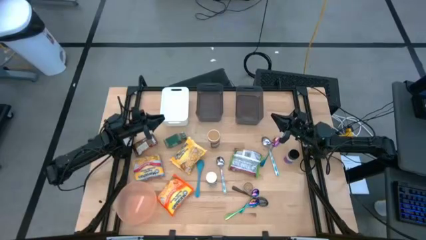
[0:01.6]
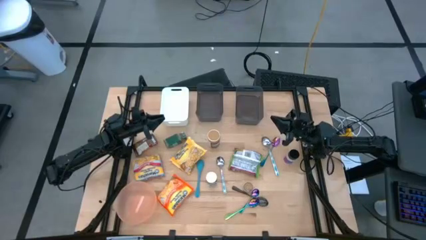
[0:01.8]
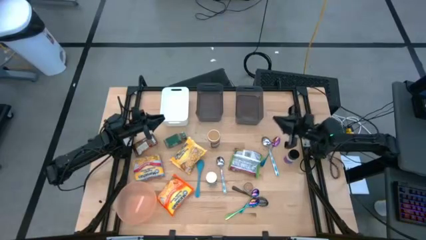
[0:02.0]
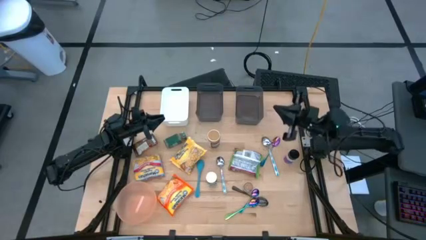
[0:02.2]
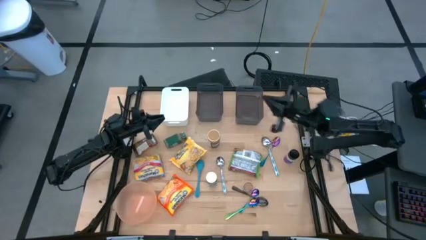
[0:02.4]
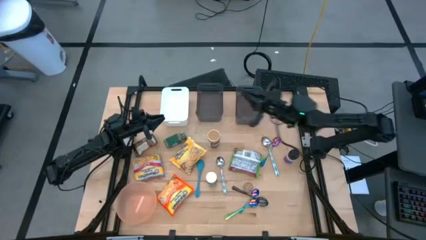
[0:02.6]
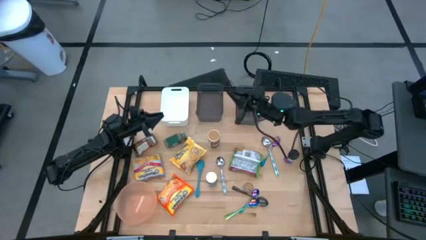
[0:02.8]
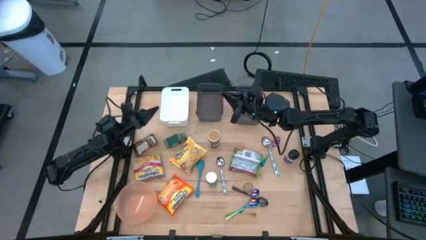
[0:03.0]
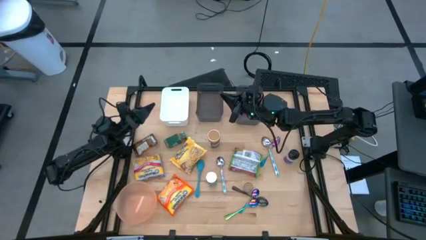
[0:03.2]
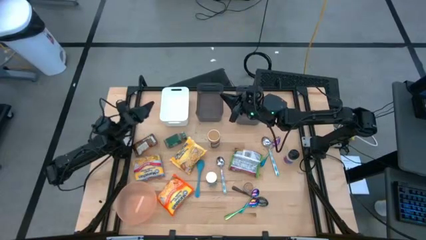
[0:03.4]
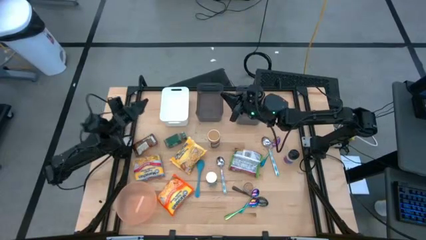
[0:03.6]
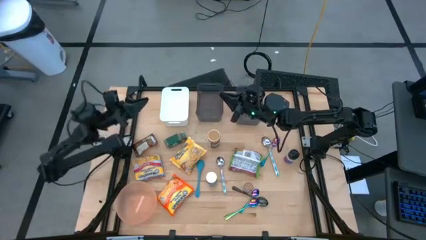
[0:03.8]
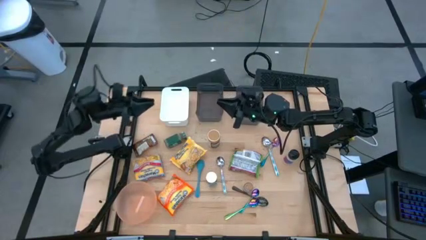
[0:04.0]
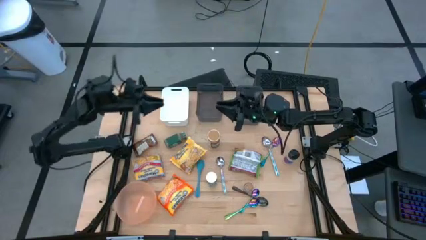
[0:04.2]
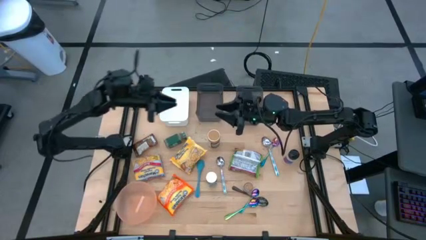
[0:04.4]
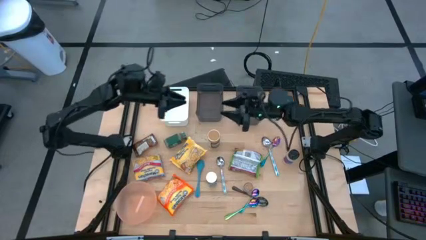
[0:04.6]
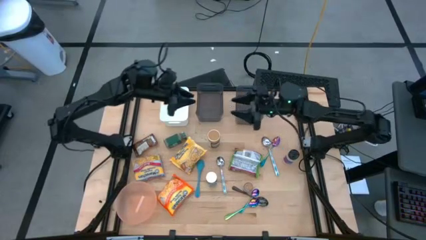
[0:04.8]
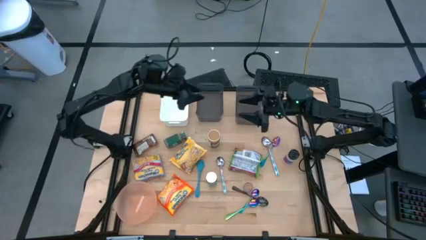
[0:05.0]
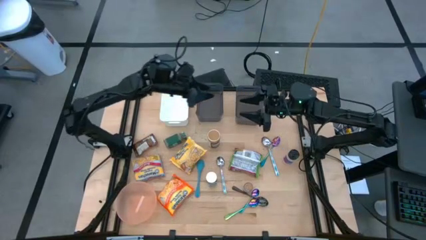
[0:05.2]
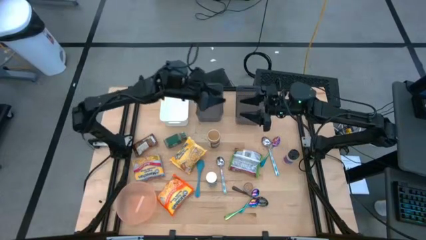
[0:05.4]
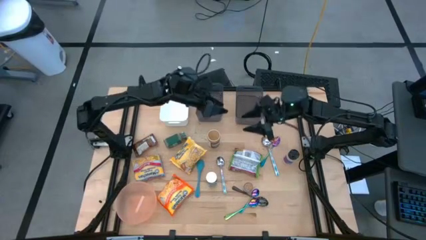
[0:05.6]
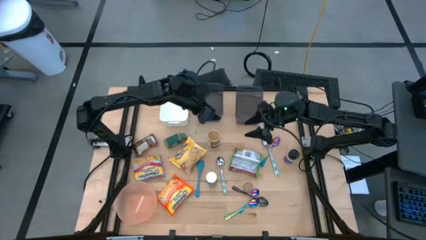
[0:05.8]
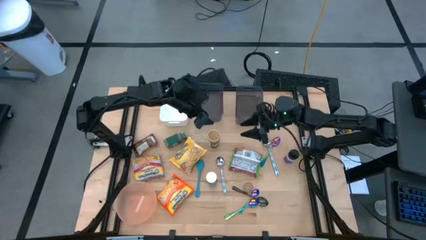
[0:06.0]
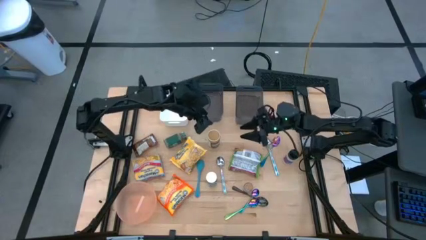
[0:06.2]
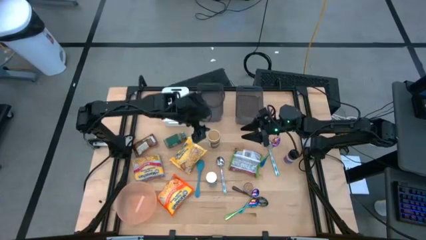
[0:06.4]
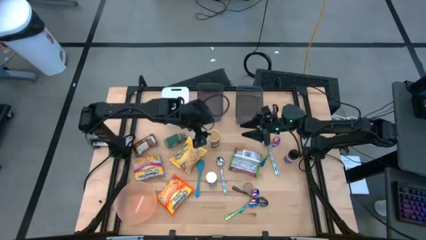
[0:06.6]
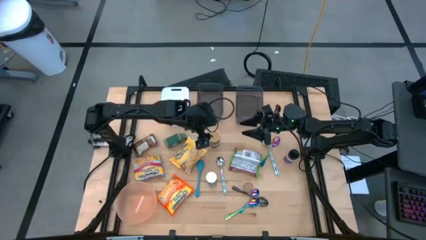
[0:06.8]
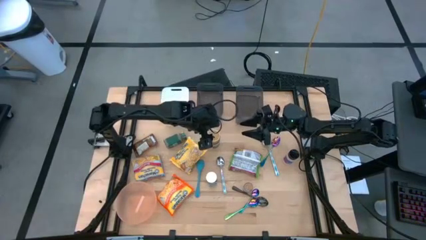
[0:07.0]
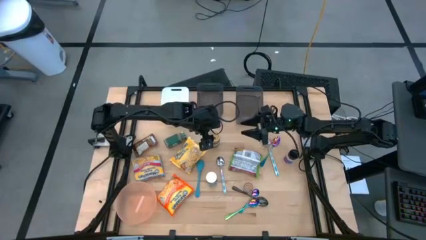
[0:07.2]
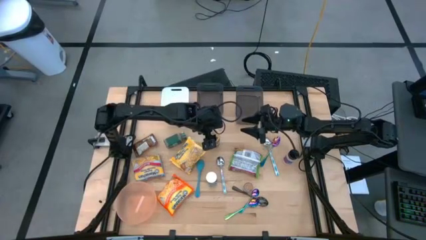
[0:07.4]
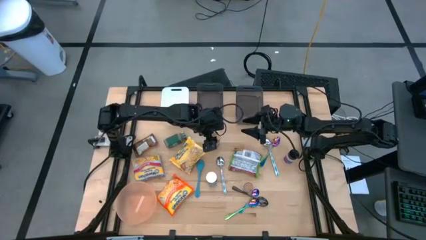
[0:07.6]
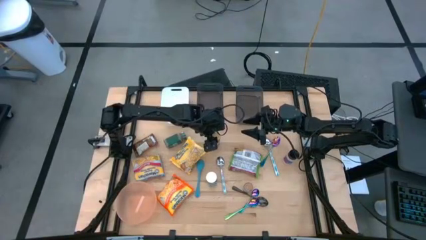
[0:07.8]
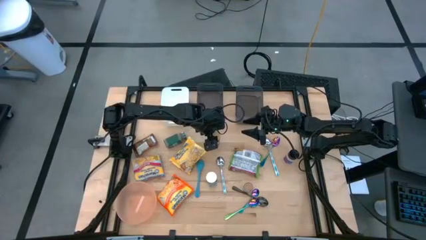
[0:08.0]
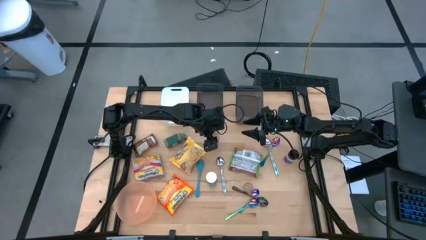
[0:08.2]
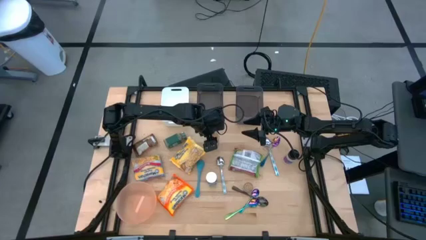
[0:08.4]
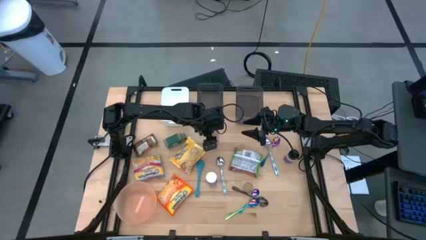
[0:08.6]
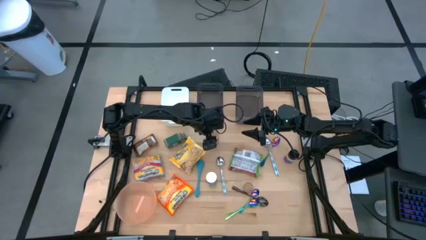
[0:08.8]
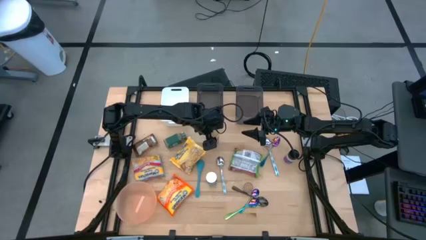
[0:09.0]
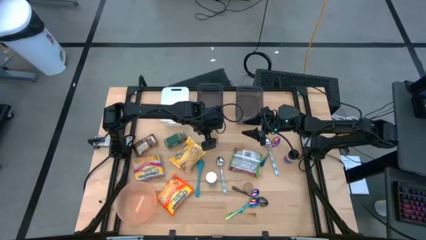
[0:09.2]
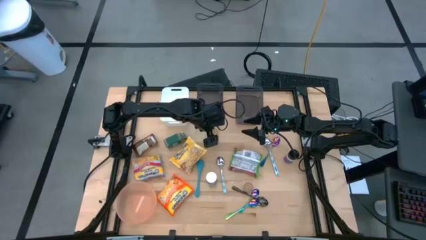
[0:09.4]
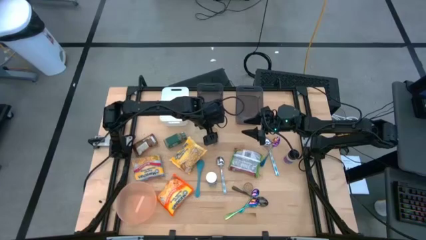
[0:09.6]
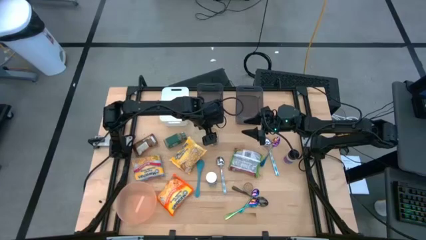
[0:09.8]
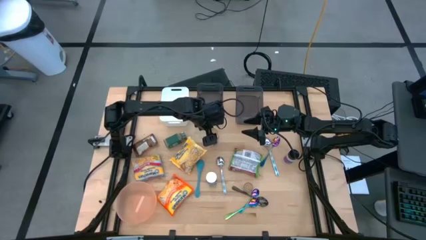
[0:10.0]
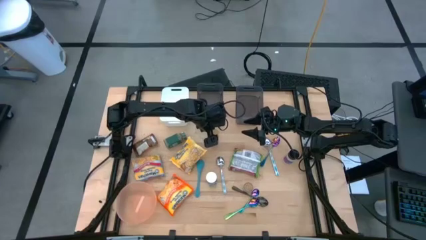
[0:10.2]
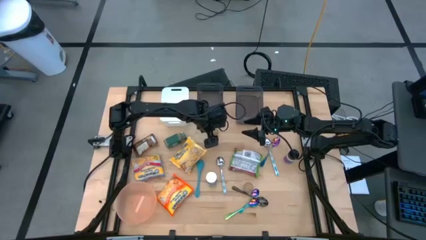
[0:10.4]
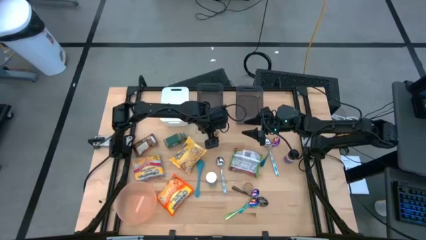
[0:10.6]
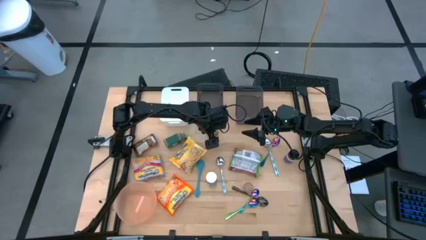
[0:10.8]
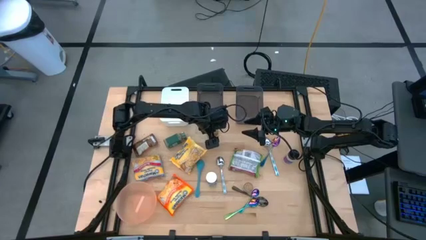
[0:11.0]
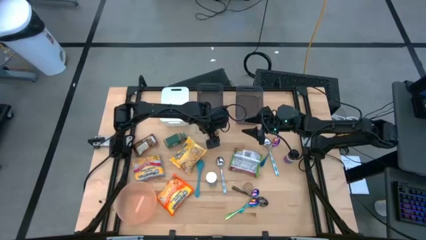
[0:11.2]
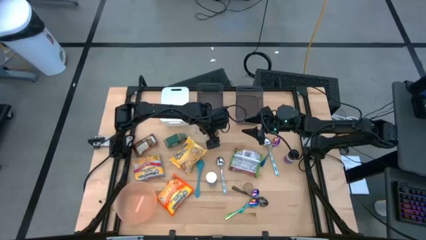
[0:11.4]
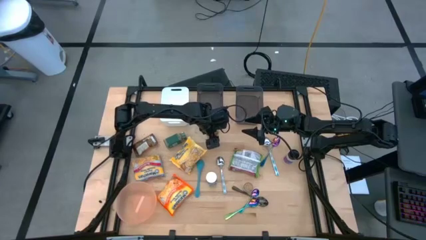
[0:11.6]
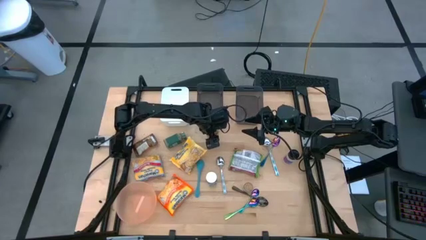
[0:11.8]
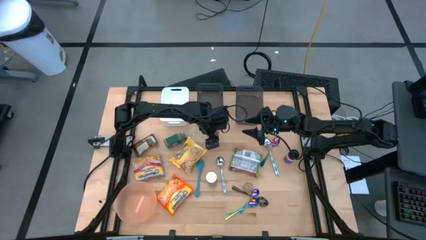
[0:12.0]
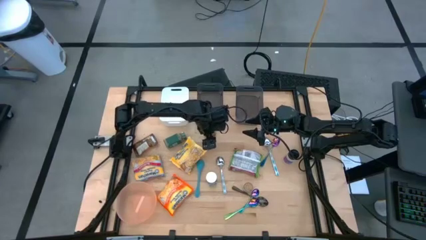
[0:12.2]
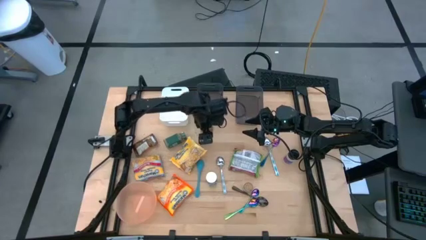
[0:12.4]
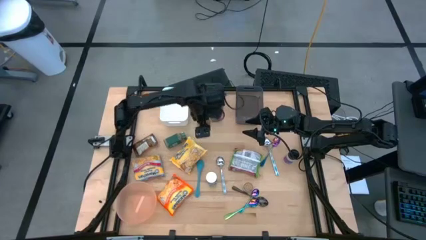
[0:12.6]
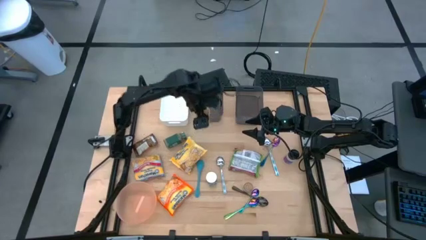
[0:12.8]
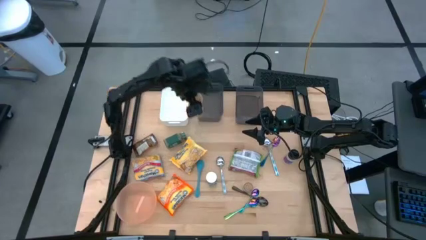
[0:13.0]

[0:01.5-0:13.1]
Task: Pick & Place Food Item
Put the golden seasoning bottle into the white bin
